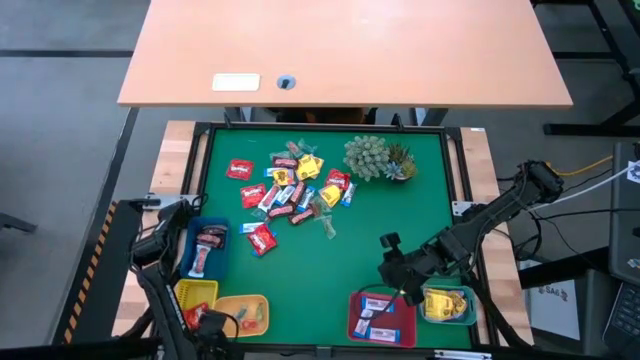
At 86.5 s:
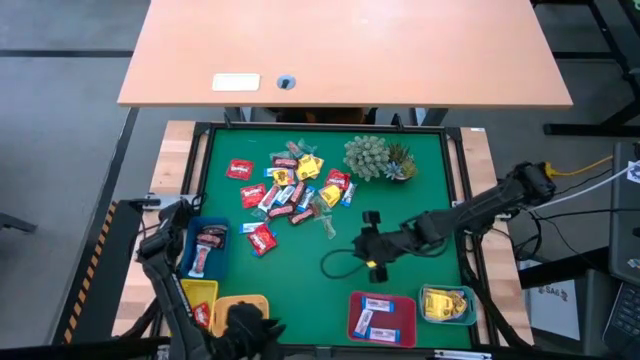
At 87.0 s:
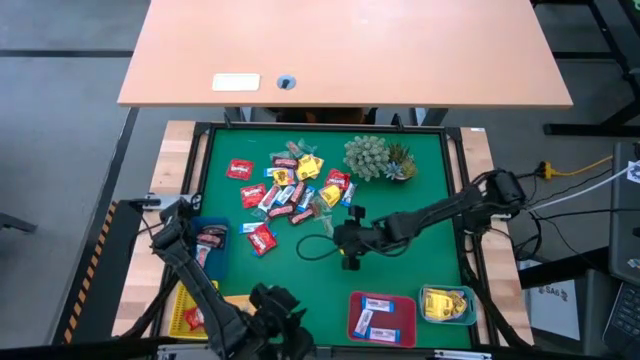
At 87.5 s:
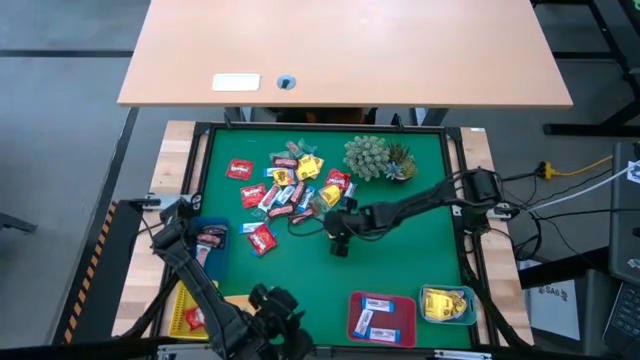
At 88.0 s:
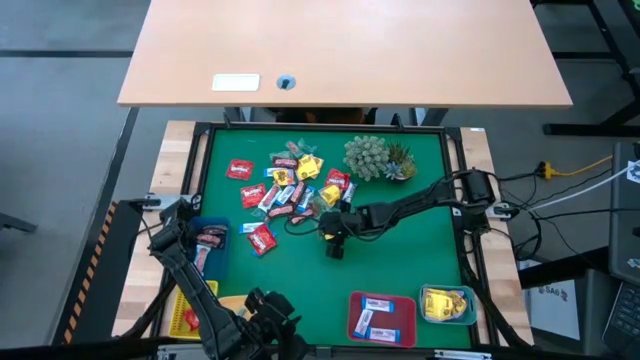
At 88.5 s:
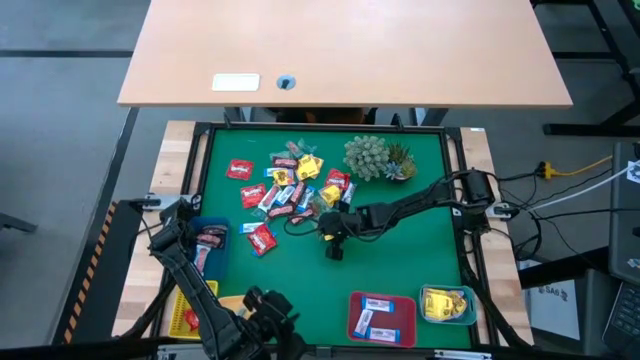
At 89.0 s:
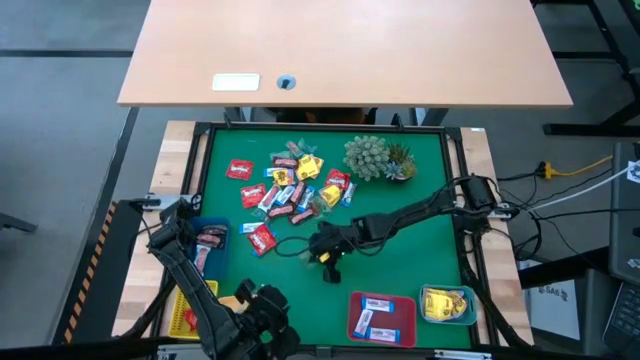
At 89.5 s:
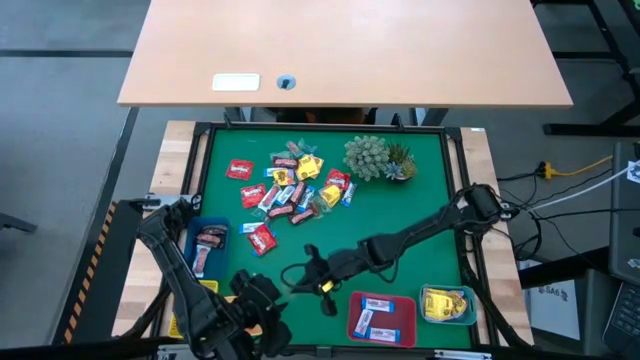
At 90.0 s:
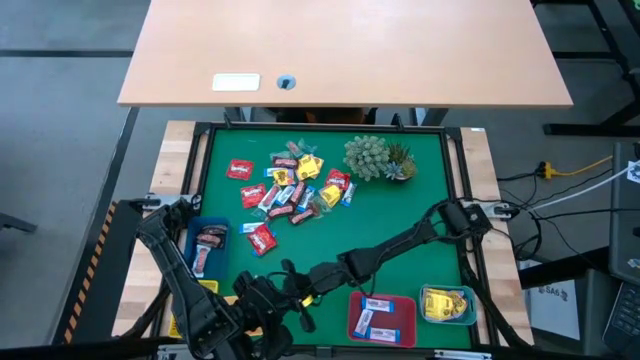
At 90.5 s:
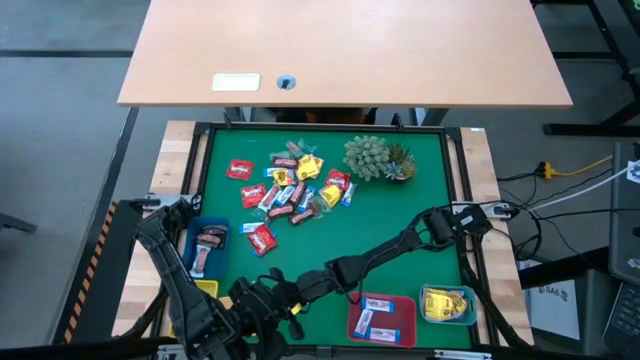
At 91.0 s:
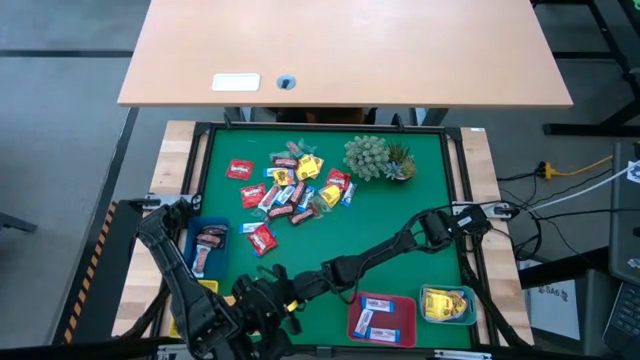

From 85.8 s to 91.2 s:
Task: Sort candy
Put the transparent candy into the orange bin

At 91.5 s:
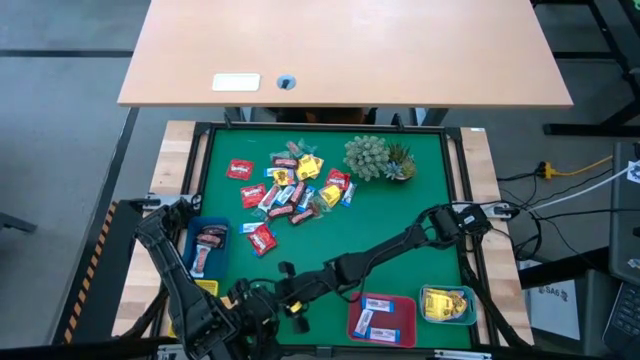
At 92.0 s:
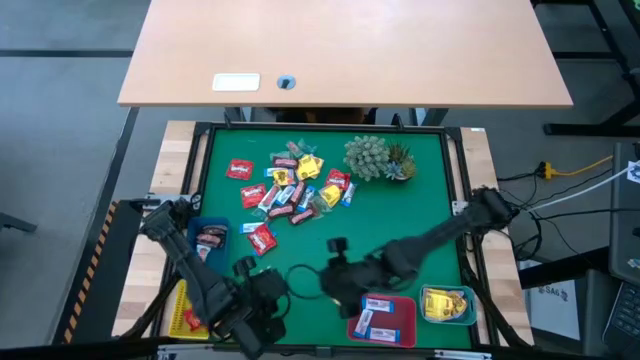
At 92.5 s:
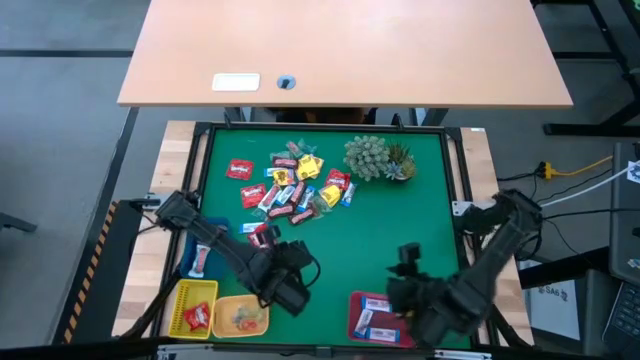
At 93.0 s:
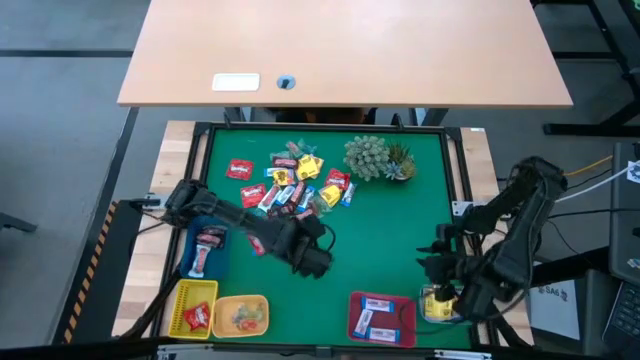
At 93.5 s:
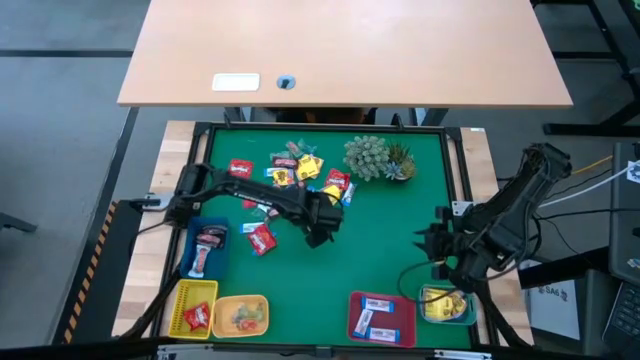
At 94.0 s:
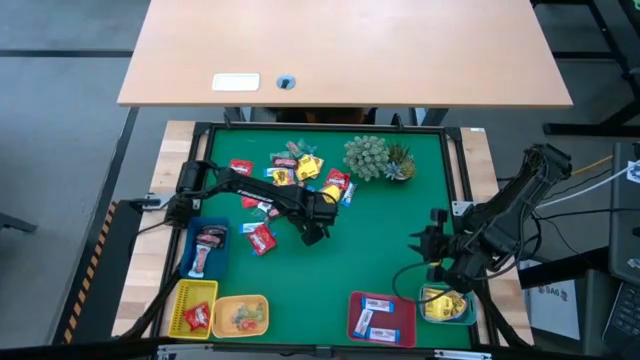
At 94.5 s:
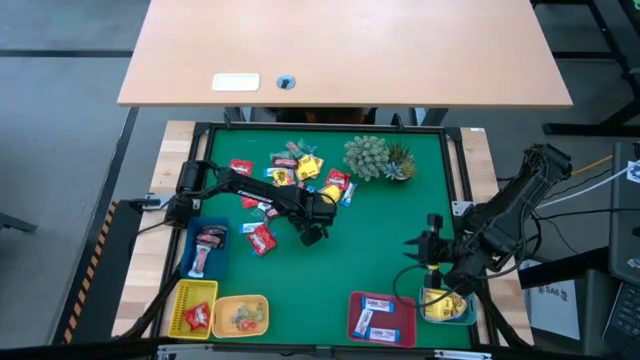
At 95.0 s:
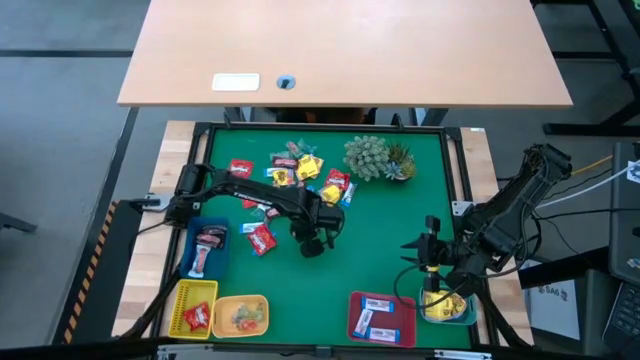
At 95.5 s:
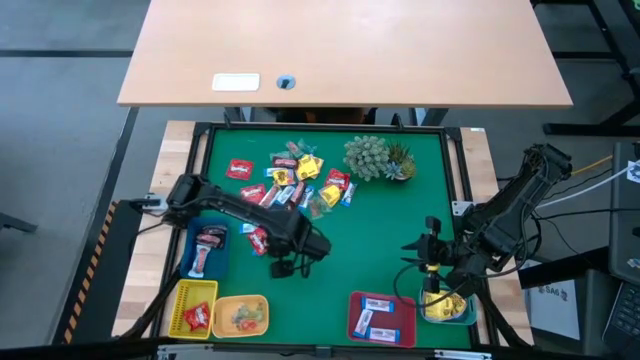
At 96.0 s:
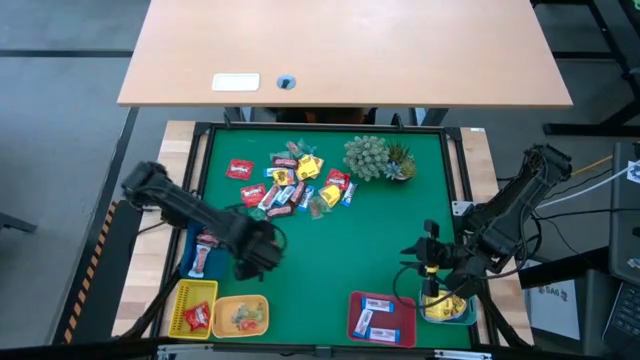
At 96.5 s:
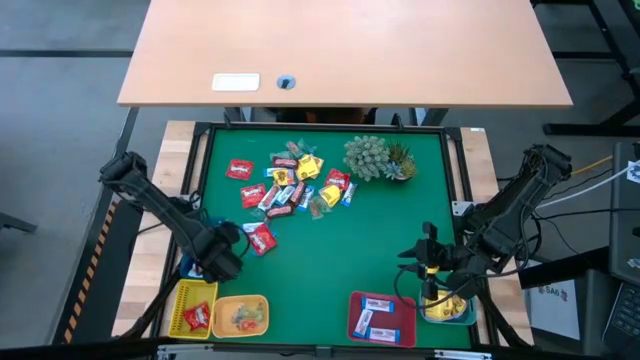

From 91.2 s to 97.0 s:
Put the brown chocolate into the blue bin

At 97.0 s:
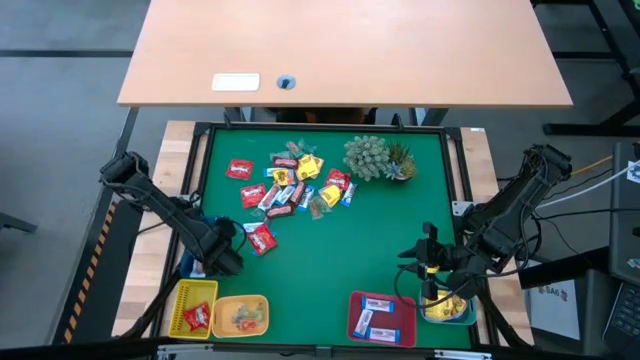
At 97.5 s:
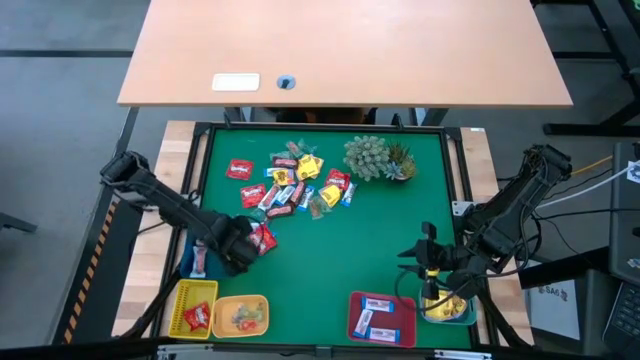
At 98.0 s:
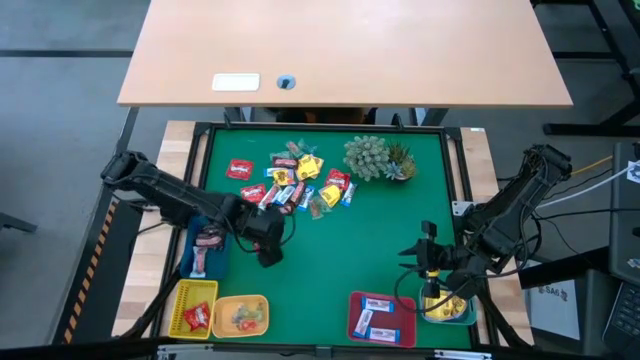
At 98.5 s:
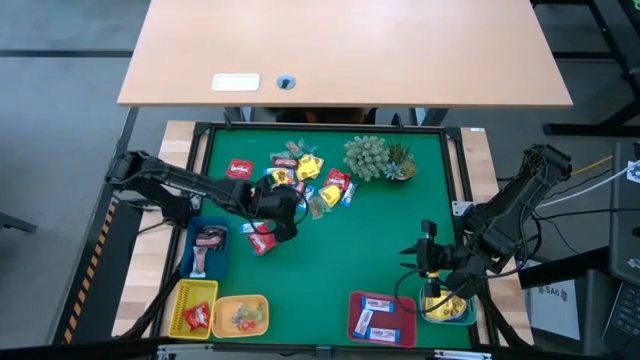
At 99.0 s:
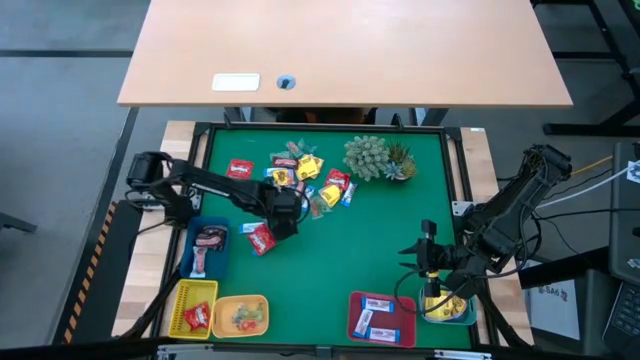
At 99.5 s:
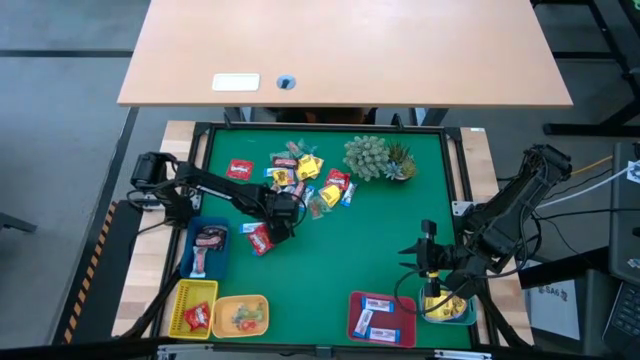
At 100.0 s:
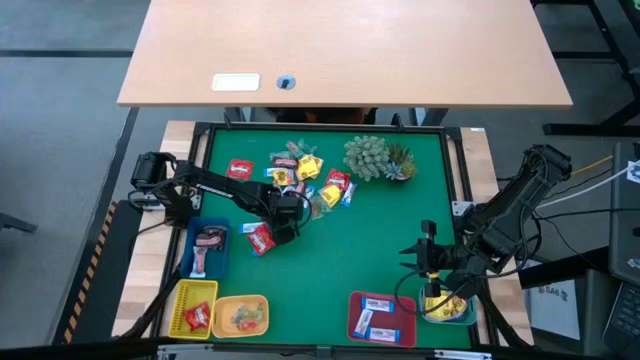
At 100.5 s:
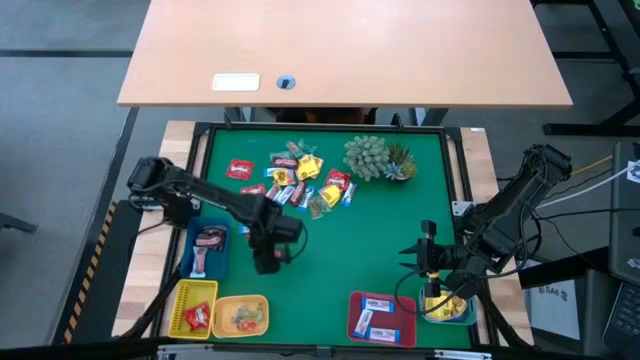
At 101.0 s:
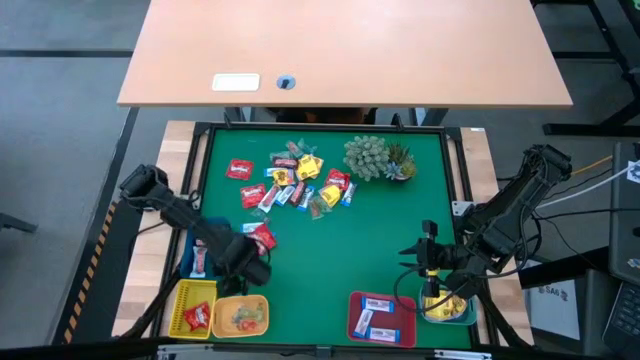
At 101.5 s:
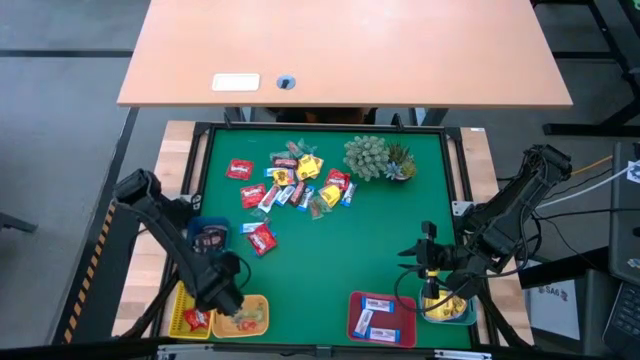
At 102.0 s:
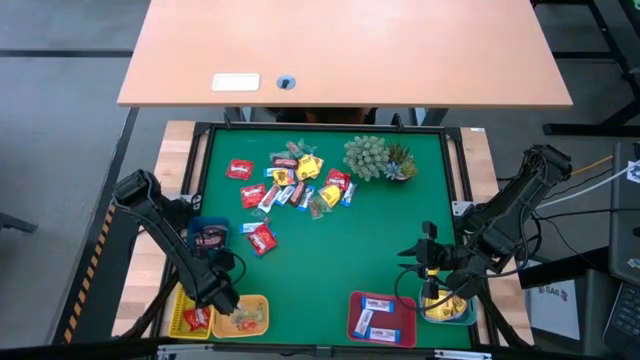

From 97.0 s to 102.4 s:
Put the brown chocolate into the blue bin

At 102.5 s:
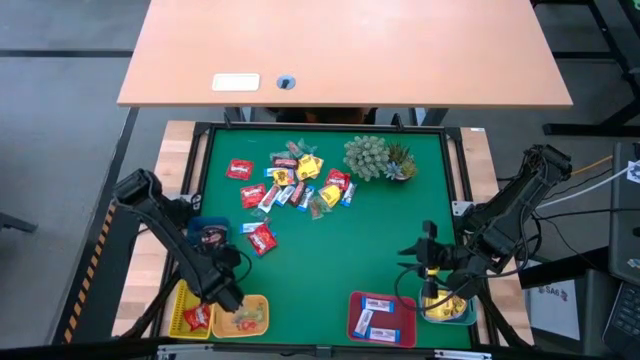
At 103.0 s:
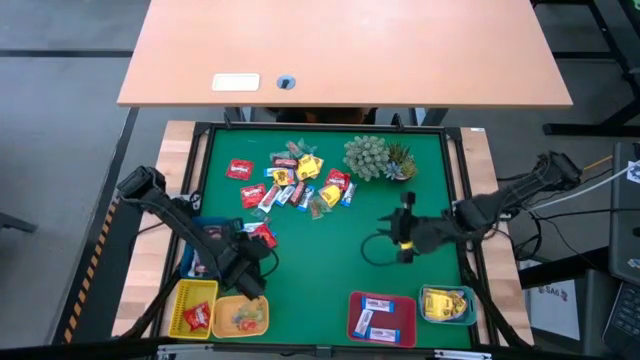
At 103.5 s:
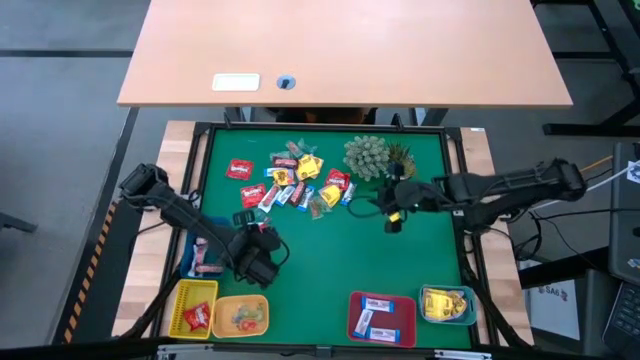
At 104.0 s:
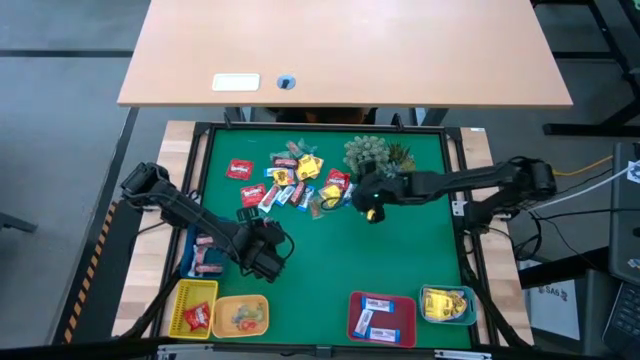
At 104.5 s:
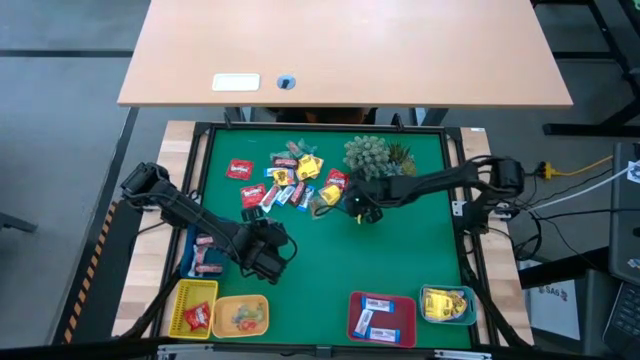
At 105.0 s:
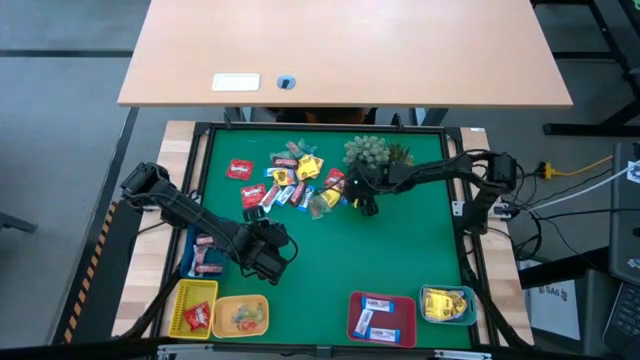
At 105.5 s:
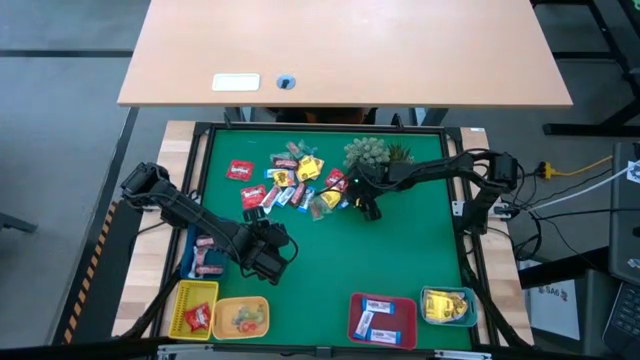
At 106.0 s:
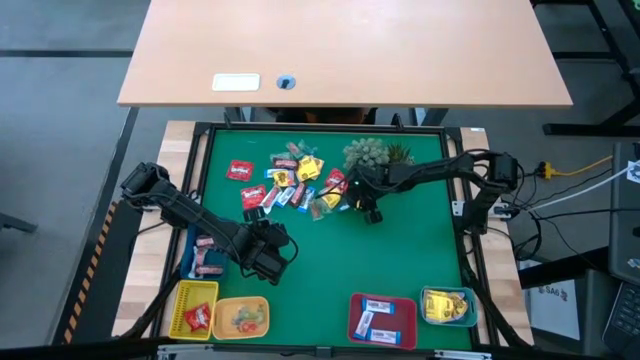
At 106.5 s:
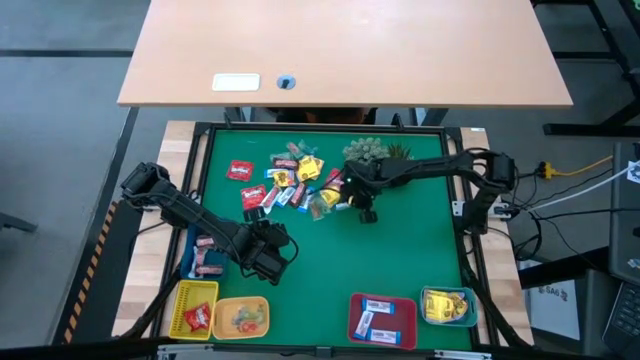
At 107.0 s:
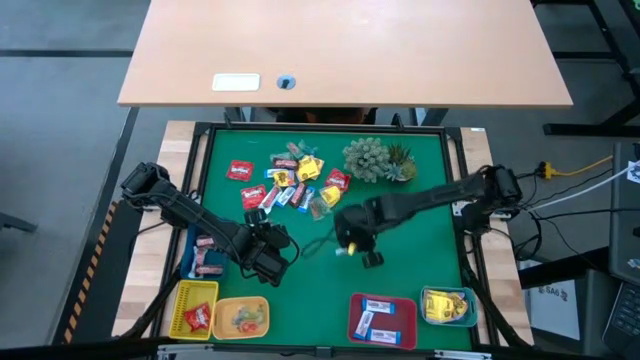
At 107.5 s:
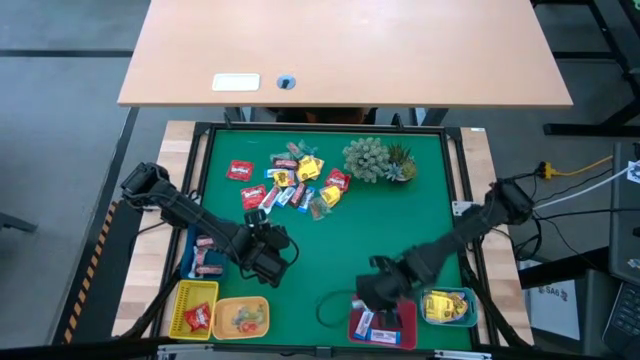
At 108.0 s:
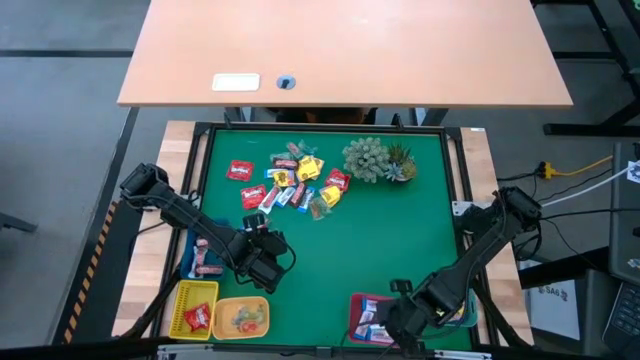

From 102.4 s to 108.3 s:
Put the blue chocolate into the red bin
